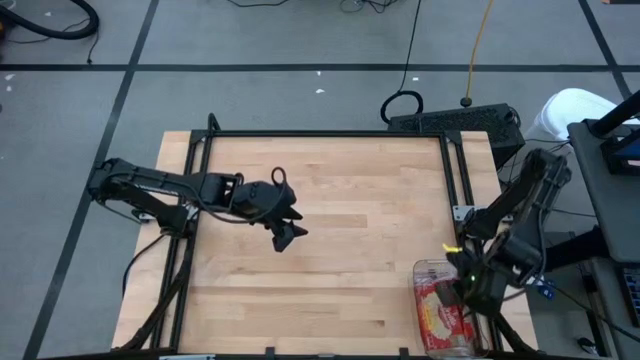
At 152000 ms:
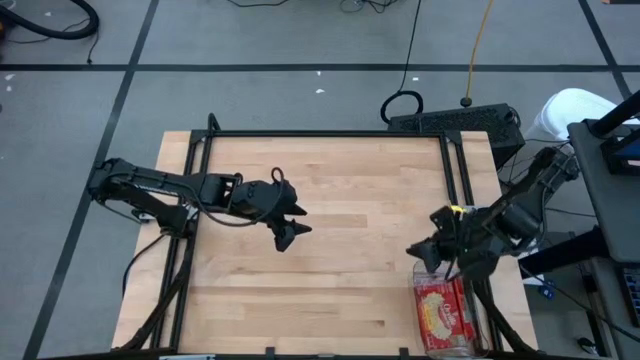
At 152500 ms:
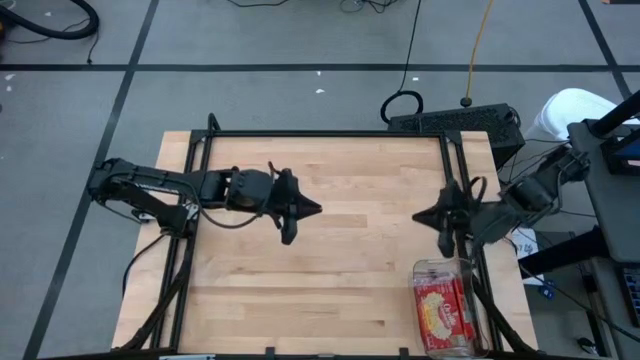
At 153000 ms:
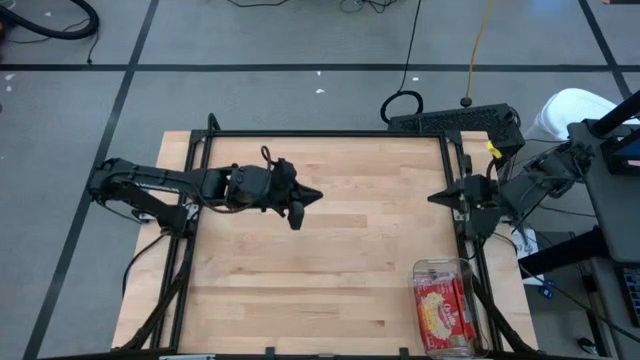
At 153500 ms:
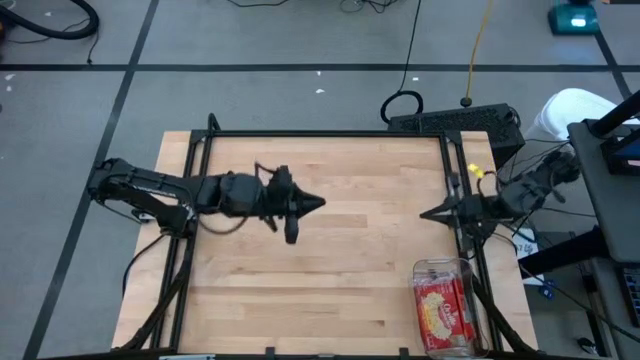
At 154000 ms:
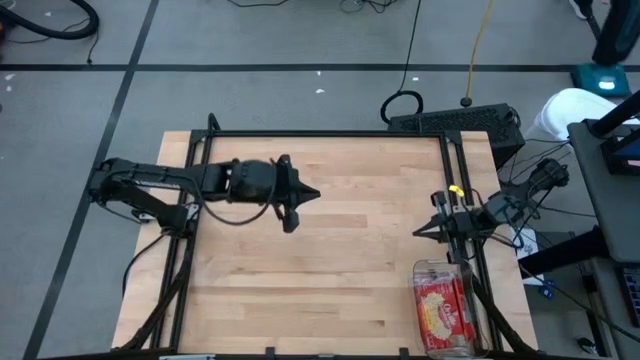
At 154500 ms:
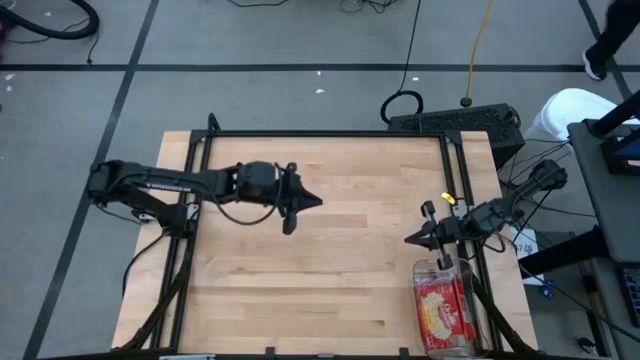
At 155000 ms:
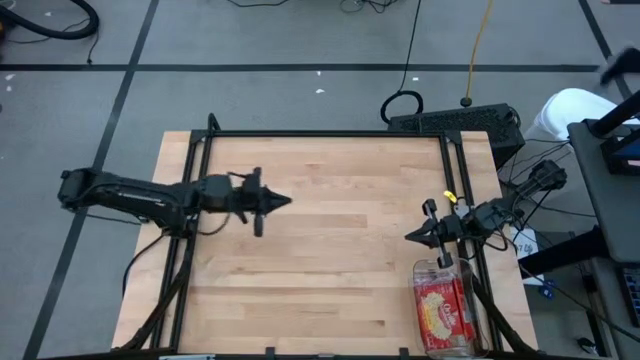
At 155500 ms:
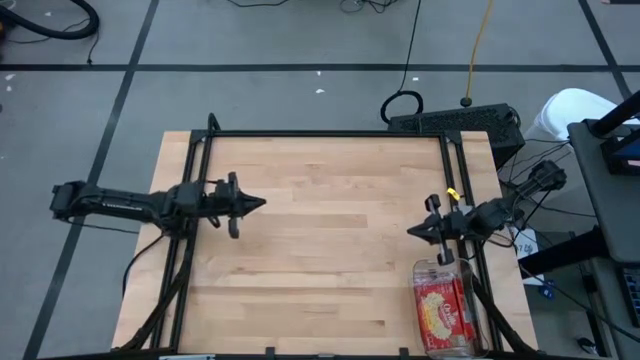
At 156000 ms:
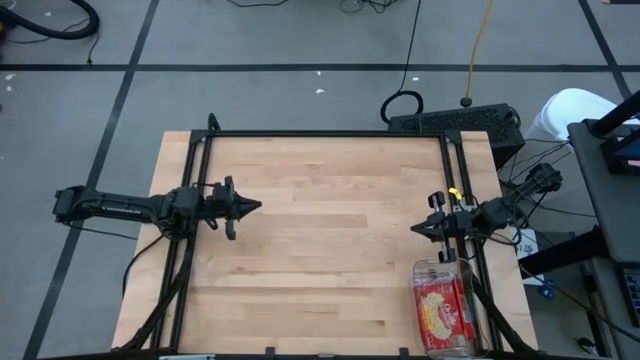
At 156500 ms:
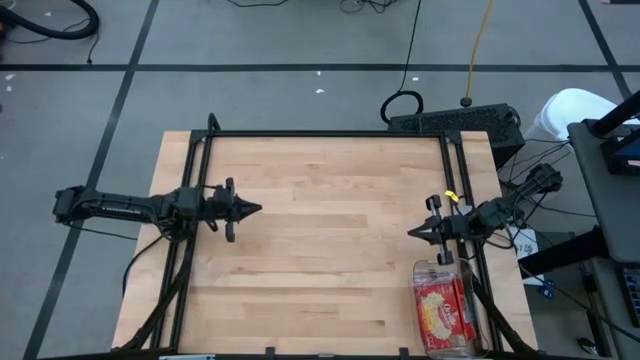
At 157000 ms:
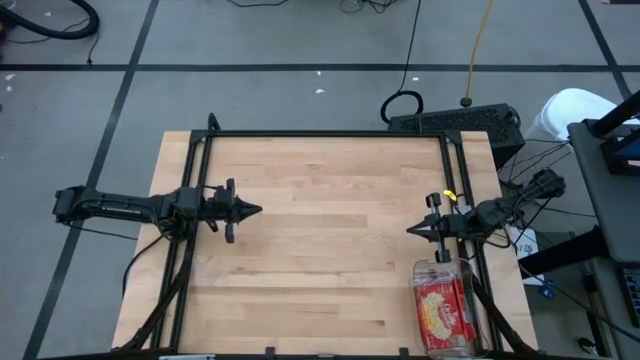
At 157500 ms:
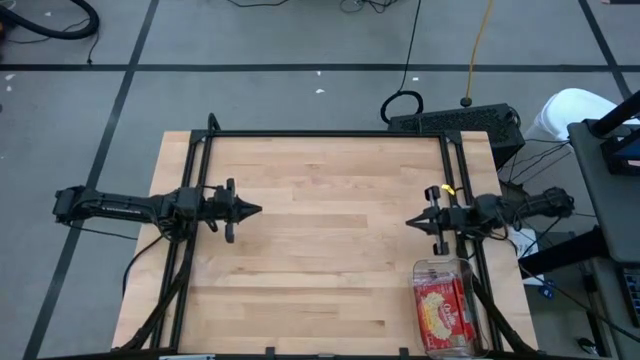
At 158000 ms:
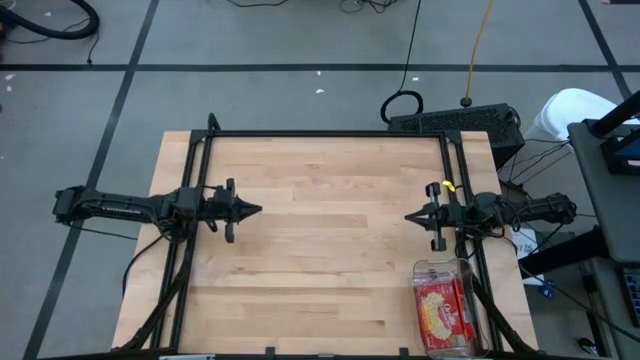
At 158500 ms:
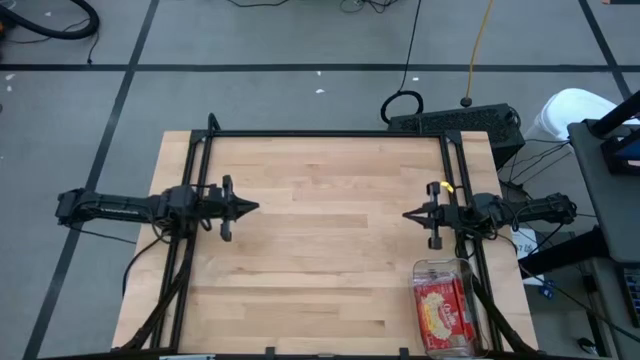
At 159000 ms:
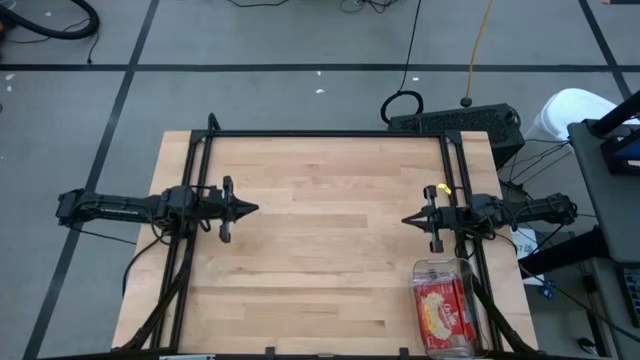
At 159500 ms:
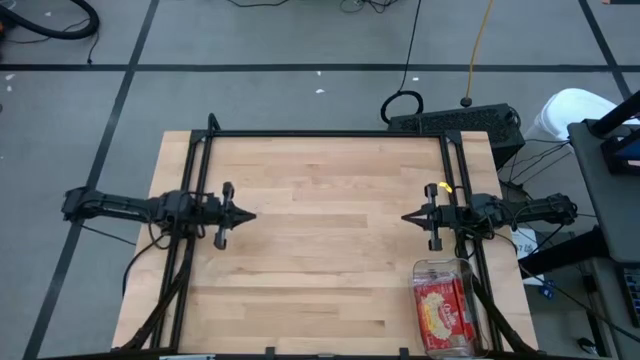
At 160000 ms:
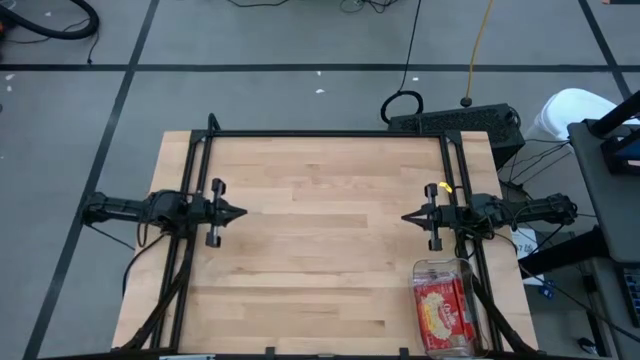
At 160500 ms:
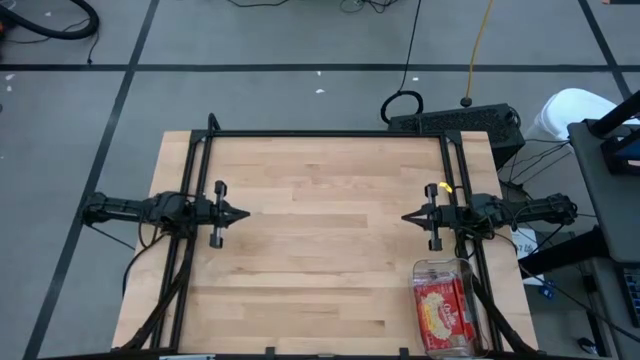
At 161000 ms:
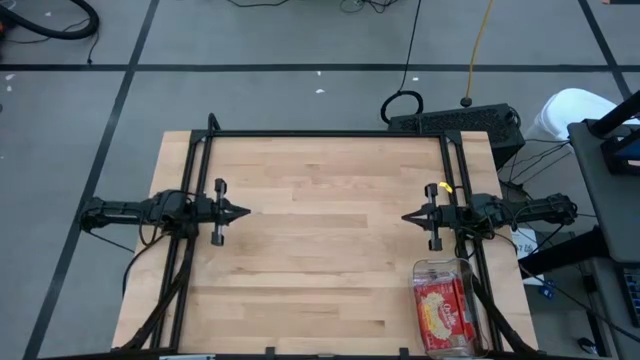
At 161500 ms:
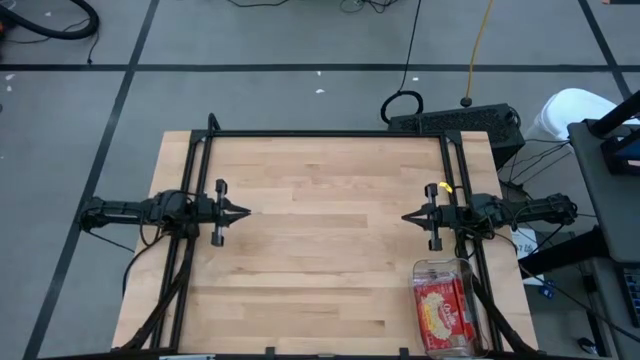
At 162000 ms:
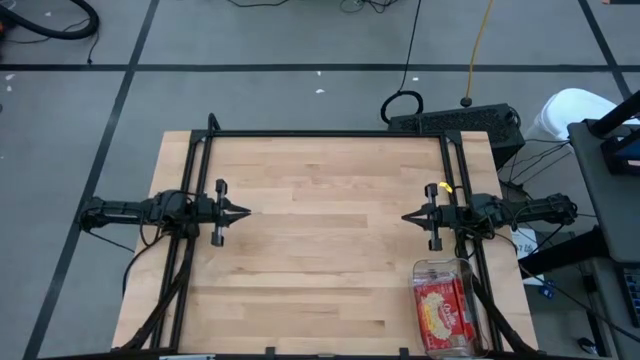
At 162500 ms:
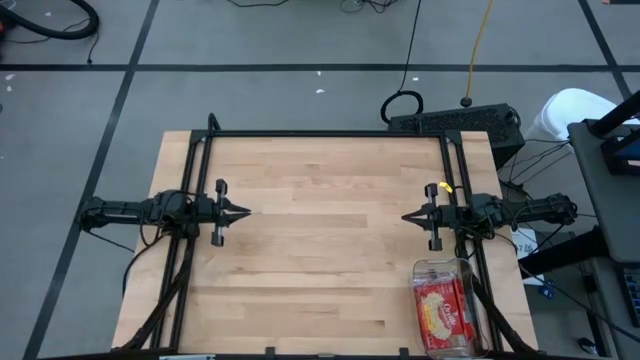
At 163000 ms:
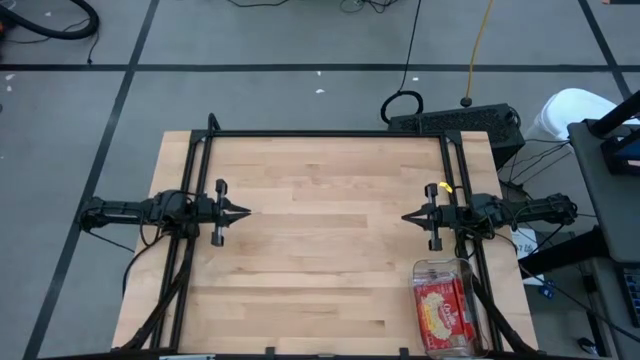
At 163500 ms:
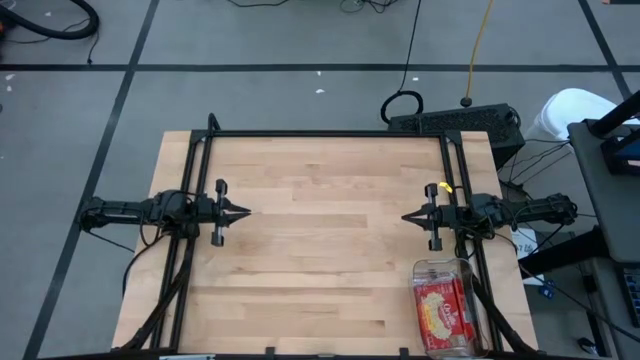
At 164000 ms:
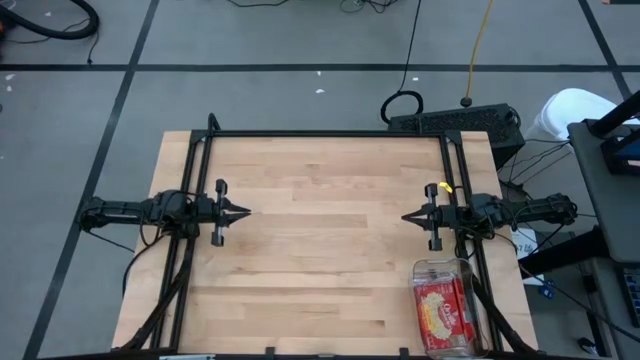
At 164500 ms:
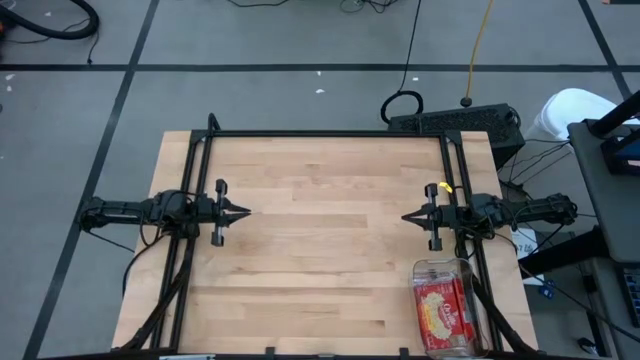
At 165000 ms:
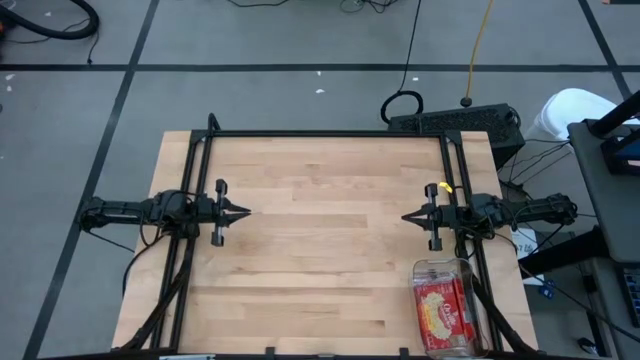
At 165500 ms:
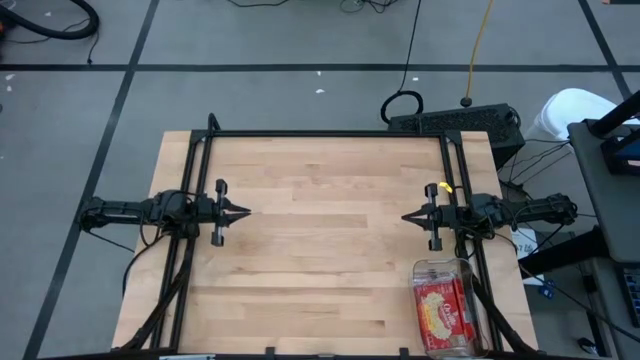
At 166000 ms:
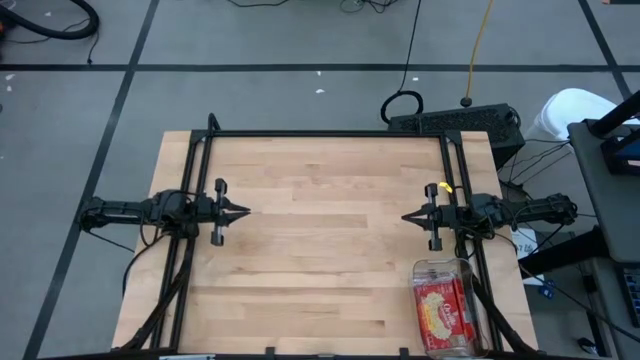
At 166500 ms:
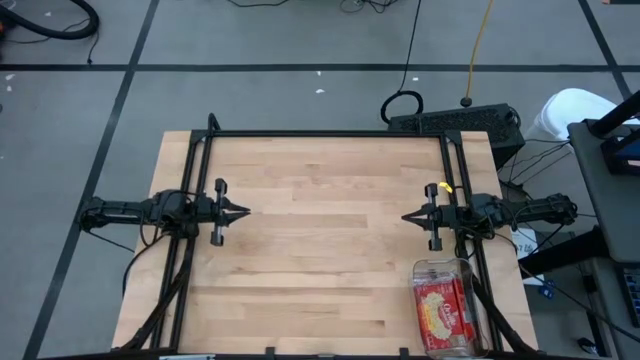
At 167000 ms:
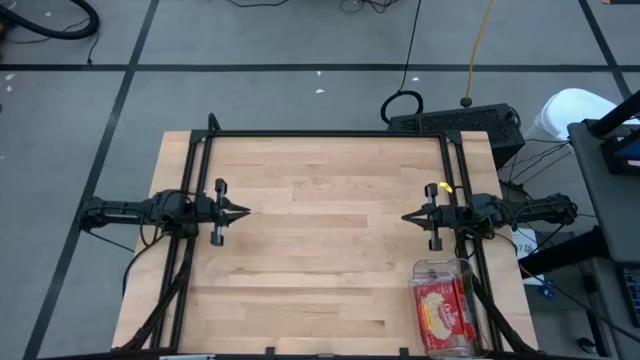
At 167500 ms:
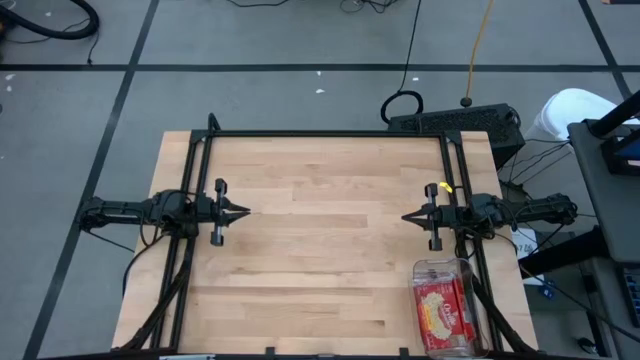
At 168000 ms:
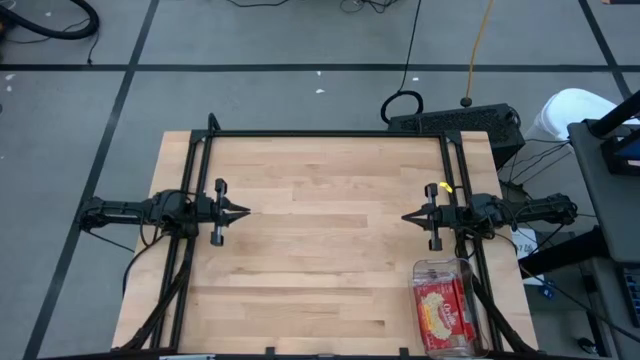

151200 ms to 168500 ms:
Task: Sort popcorn bags into baskets
Return to Home Position

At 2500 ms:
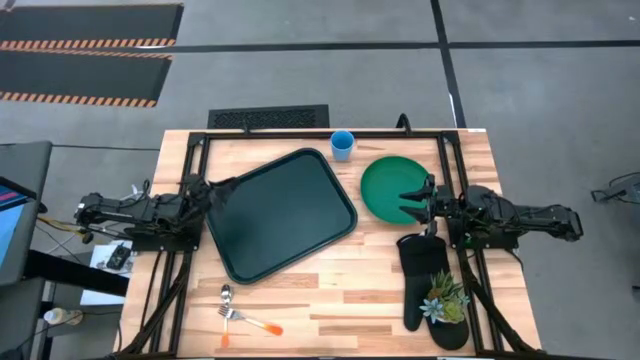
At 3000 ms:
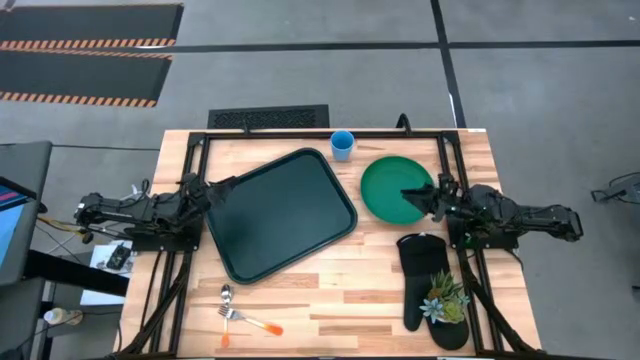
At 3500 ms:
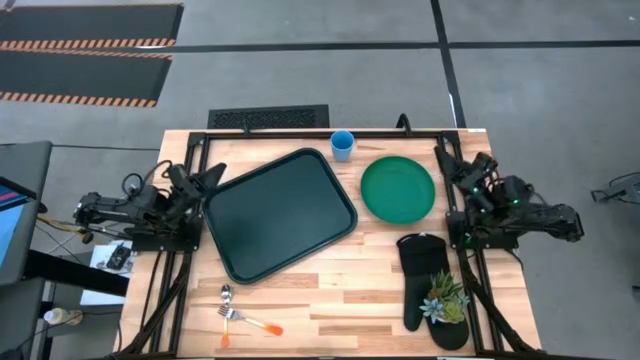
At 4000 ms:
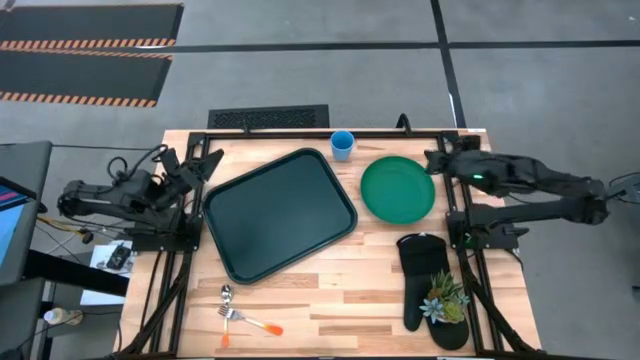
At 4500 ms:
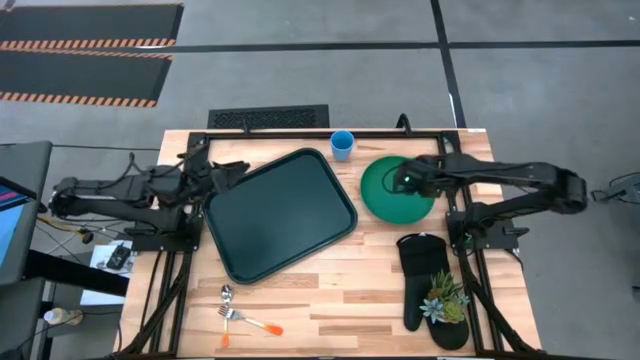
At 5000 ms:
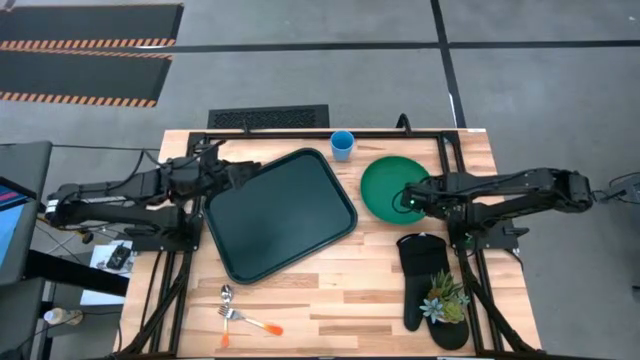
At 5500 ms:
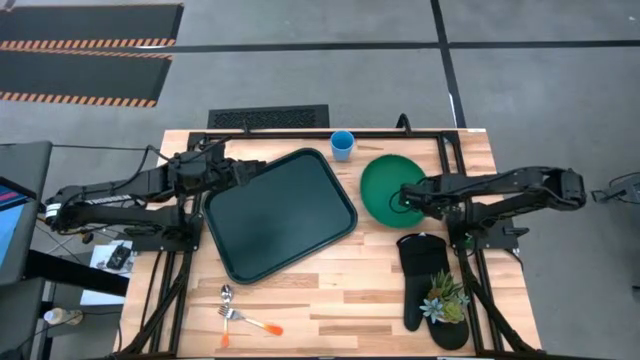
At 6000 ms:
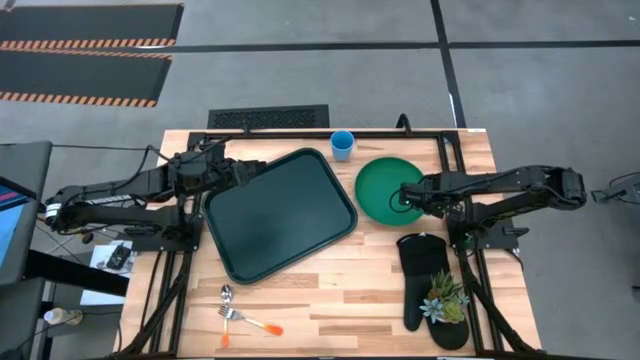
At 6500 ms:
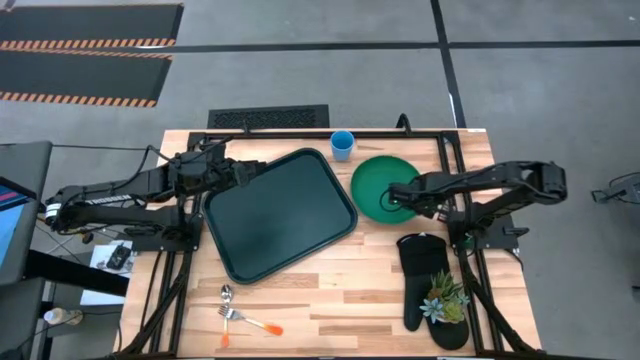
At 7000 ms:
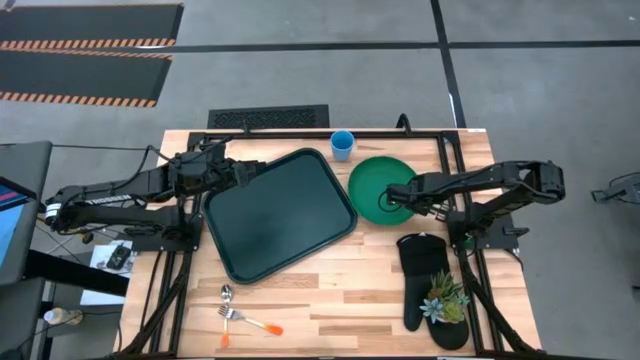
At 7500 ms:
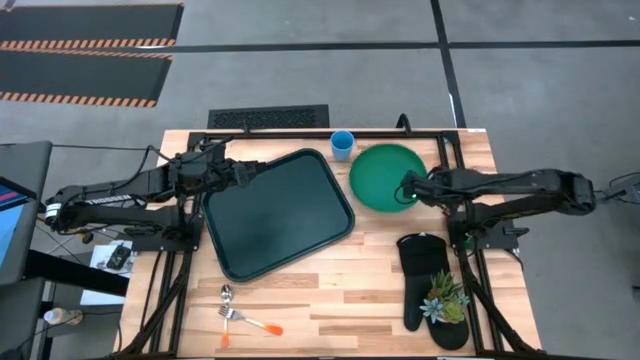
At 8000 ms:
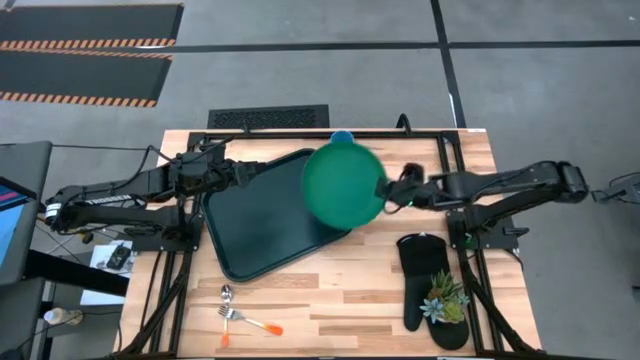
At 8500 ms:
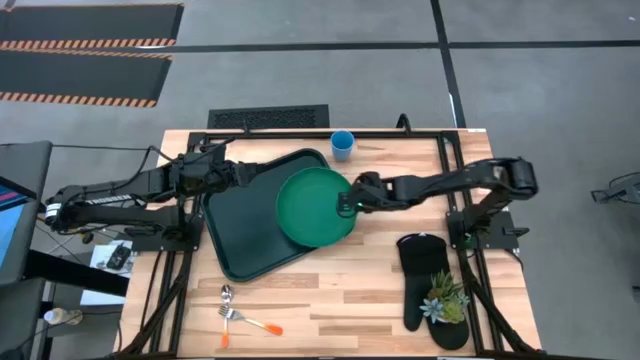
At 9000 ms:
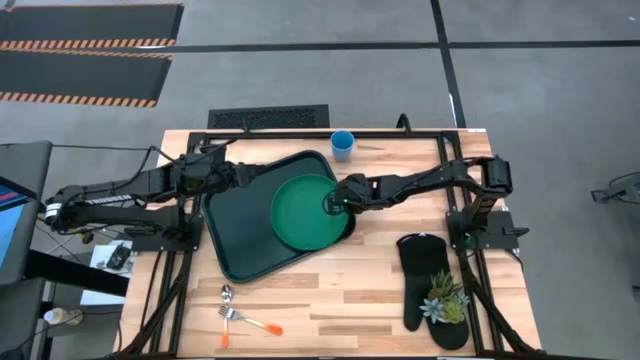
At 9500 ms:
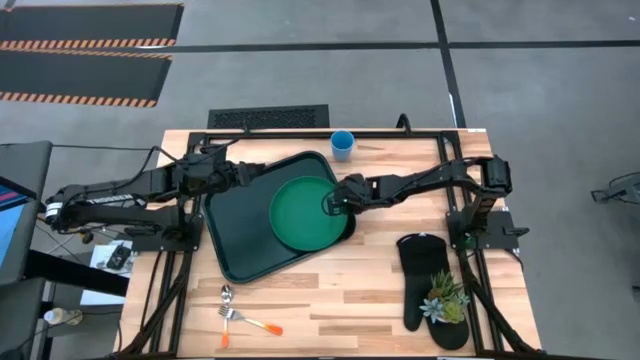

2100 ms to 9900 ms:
Task: Pick and place plate/cup/fork/spoon on tray
Put the green plate on the bottom left of the black tray
